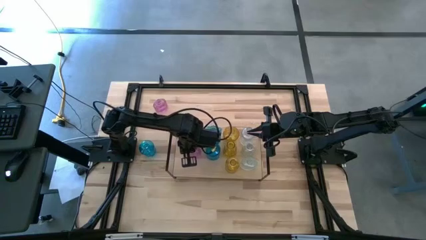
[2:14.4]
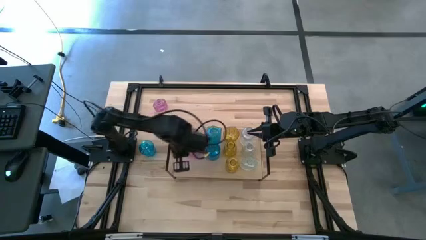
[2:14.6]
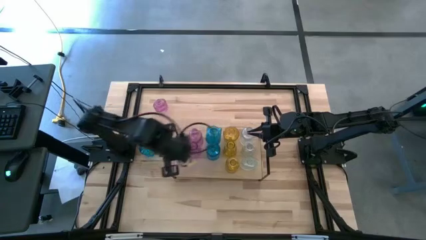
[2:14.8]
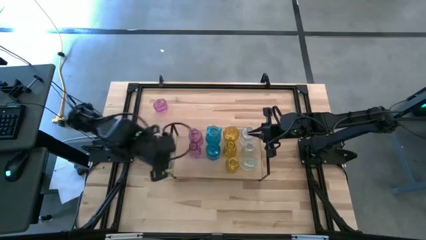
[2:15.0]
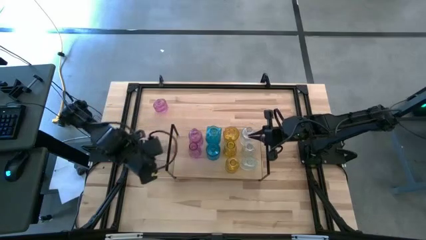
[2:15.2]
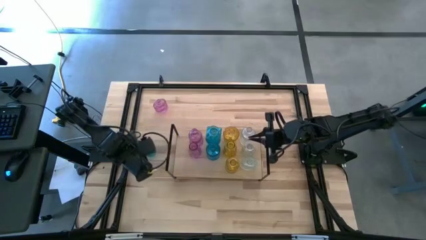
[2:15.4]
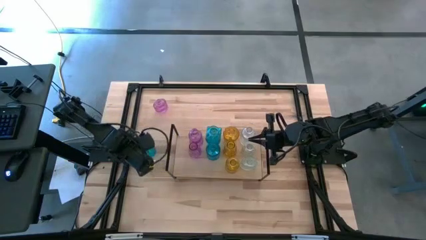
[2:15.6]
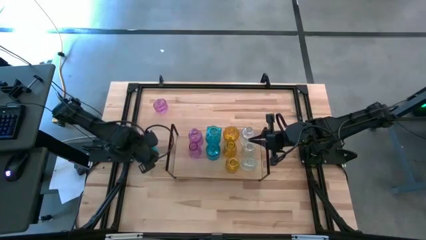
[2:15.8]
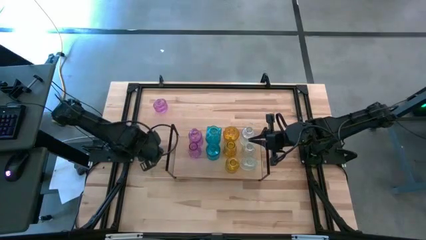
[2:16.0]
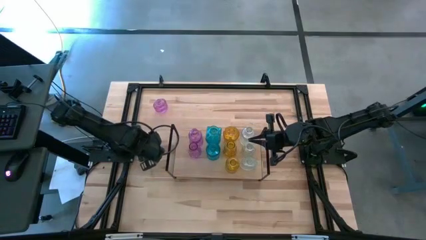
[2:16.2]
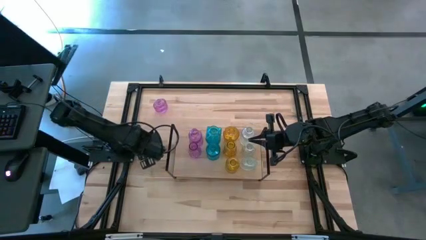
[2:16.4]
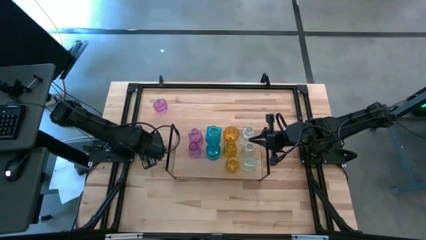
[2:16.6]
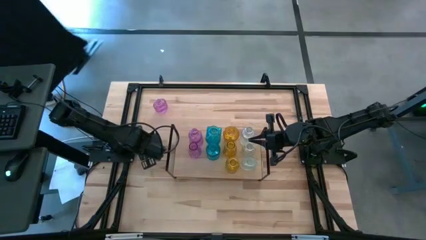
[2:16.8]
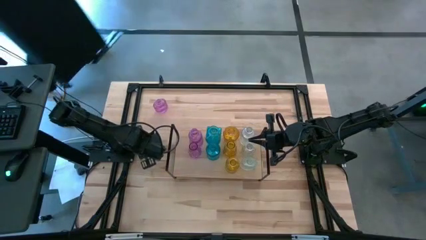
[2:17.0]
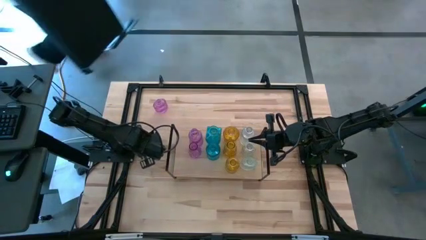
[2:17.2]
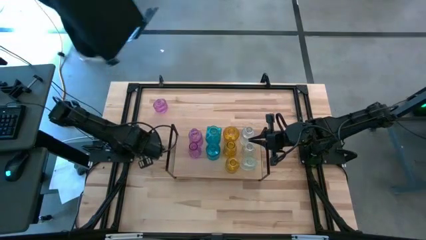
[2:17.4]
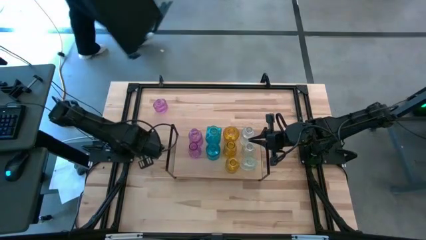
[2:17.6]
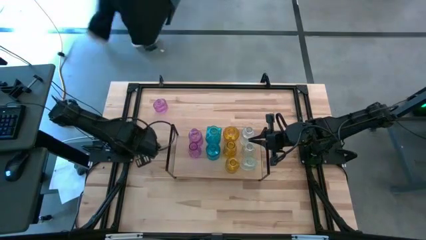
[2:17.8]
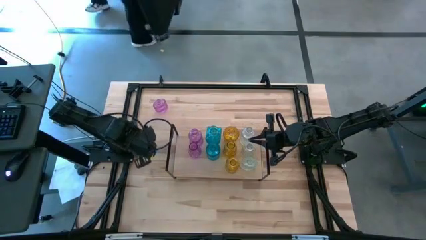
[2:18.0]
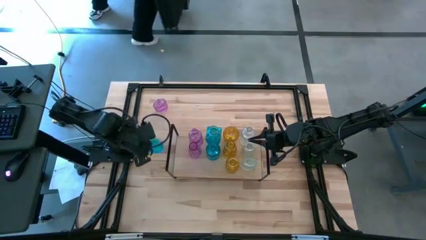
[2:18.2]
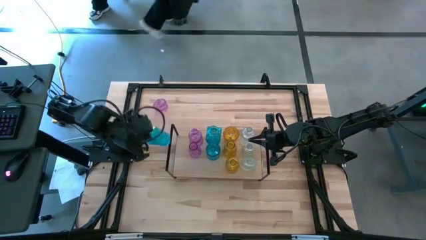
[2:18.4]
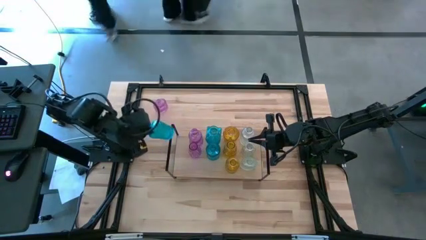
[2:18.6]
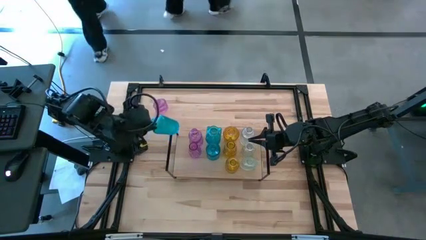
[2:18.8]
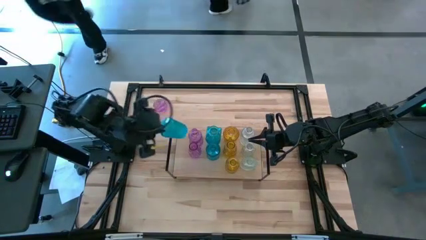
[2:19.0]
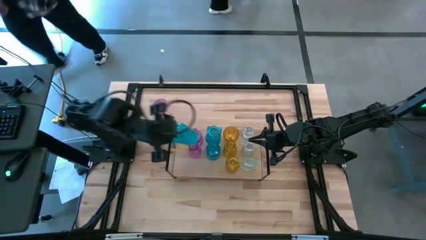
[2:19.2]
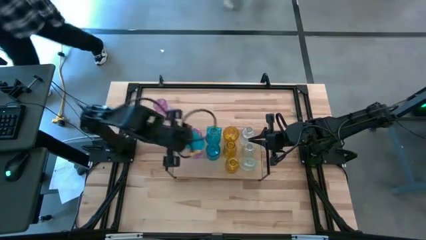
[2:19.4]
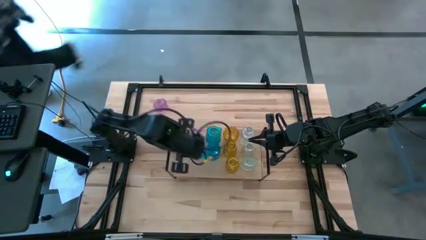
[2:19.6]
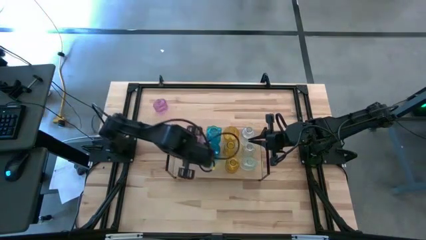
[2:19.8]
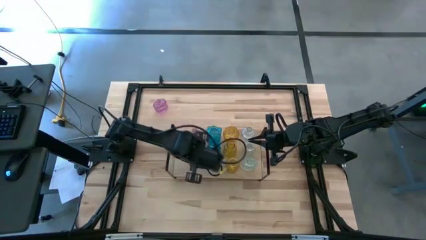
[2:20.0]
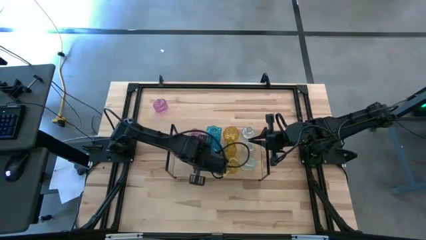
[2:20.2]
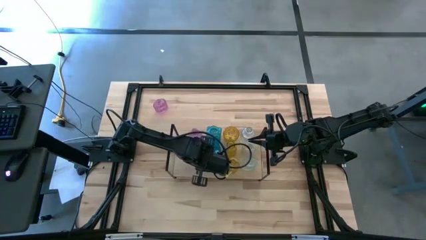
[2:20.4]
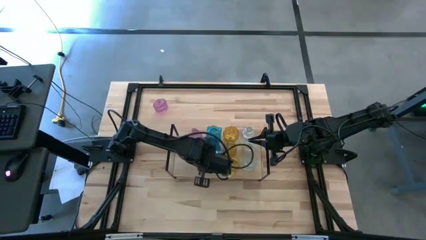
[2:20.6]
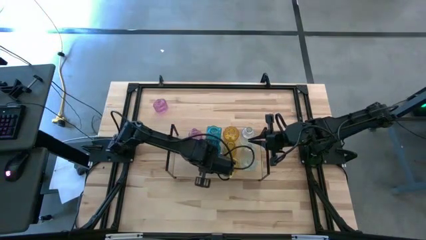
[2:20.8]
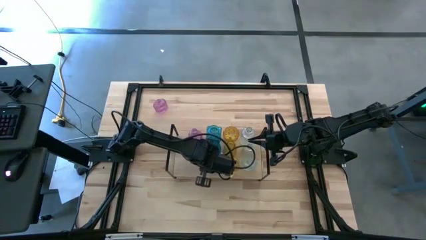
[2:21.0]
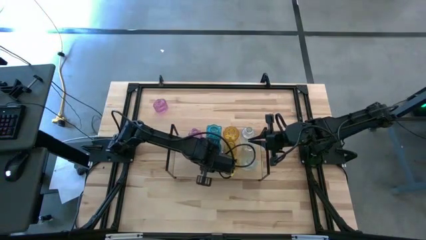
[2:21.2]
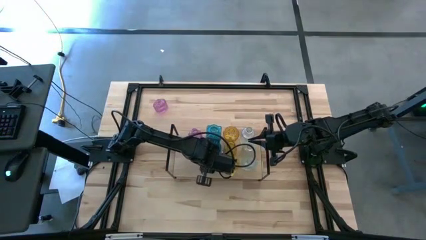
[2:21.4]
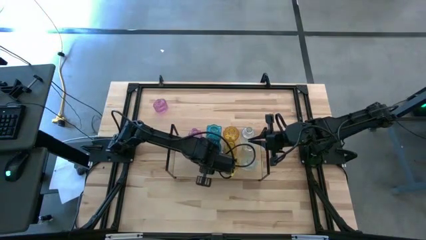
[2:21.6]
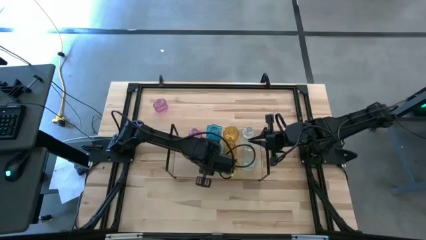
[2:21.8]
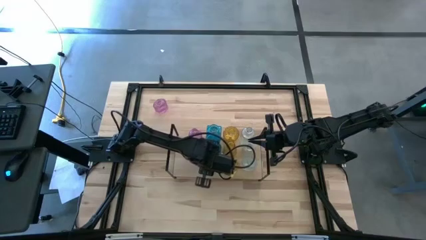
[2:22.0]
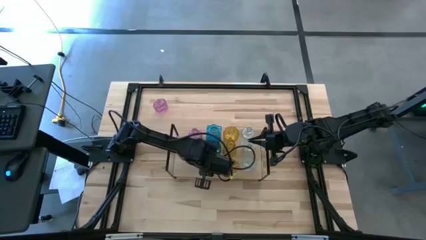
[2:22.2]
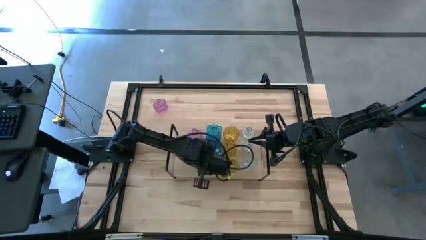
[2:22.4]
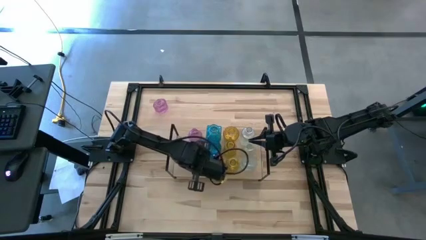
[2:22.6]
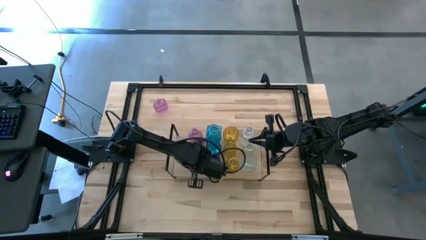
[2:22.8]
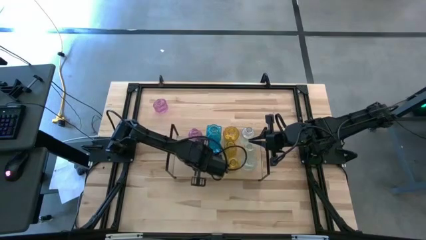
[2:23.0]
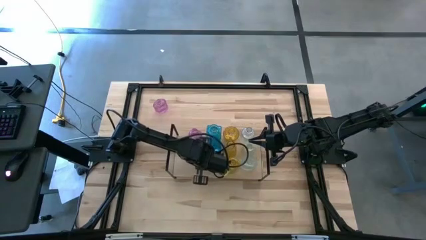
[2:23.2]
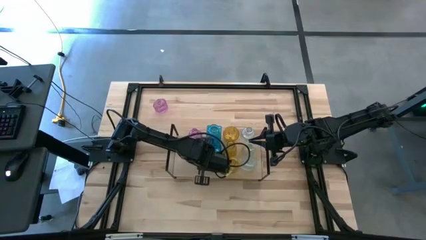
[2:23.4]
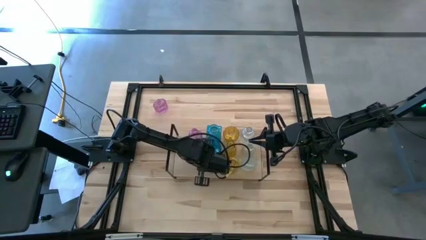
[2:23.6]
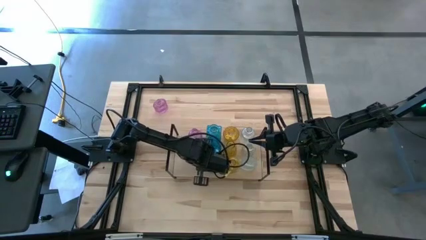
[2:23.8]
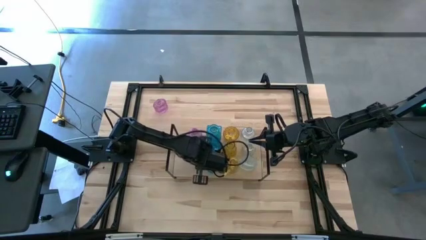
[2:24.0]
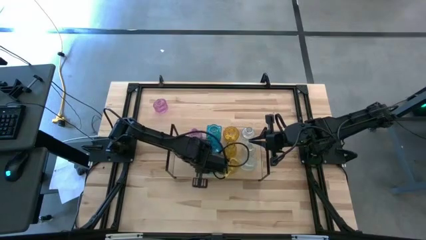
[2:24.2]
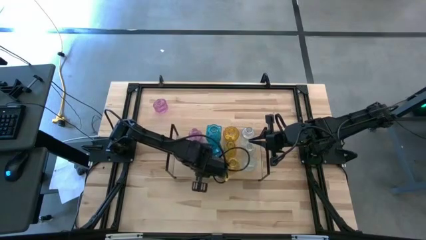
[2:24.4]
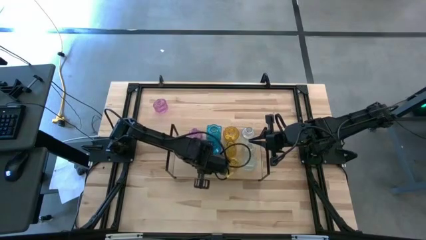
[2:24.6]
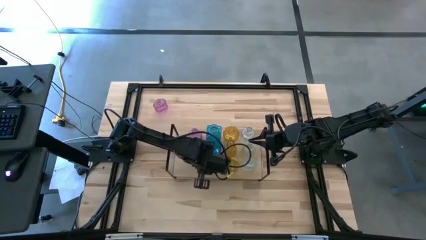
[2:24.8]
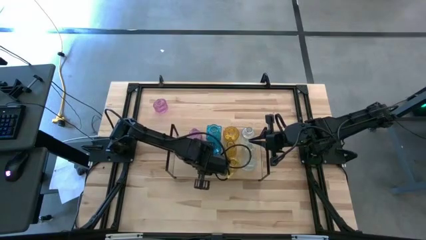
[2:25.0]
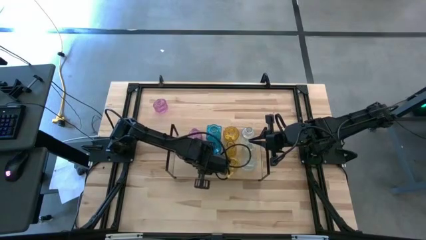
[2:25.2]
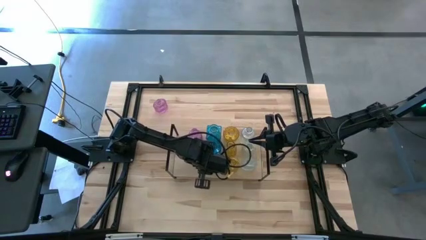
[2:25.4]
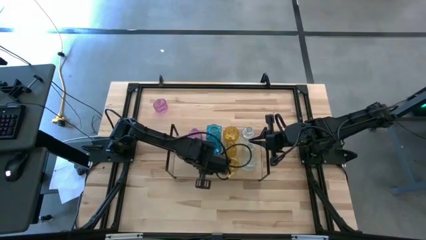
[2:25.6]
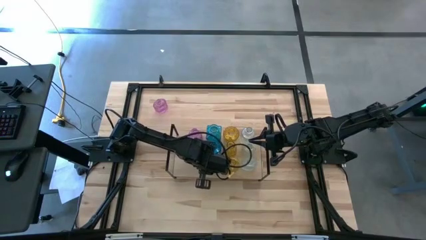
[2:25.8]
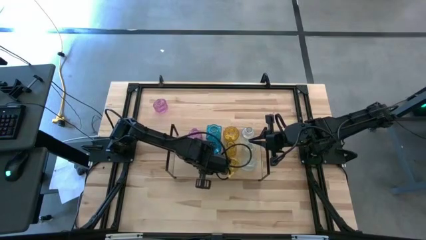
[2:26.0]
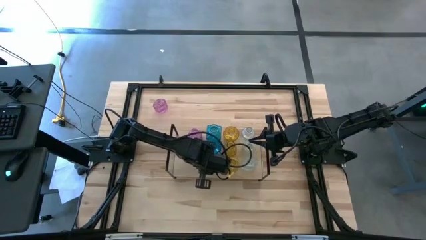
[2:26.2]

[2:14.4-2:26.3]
Task: sort vases onto shelf
Put the blue vase on the shelf aligned with the other blue vases
